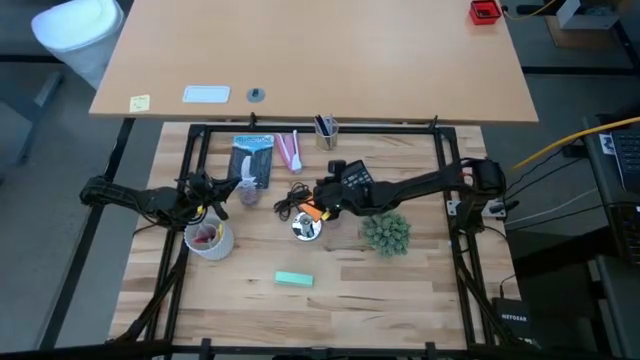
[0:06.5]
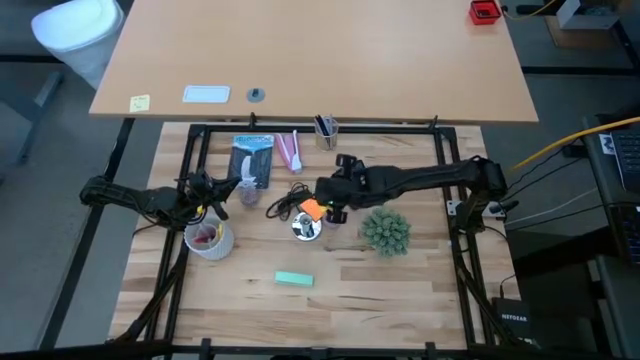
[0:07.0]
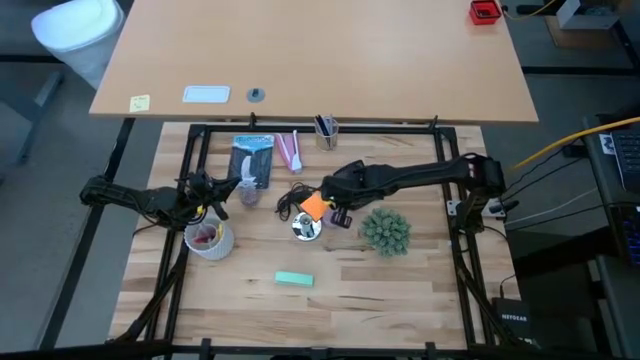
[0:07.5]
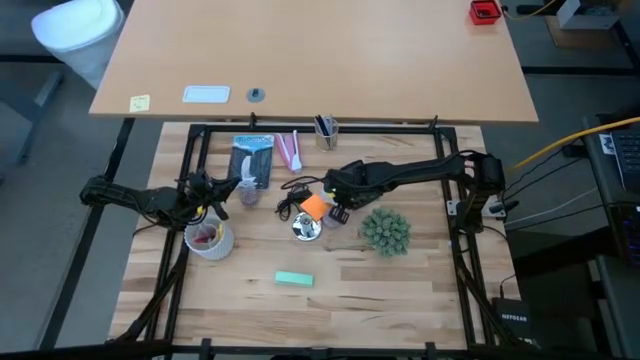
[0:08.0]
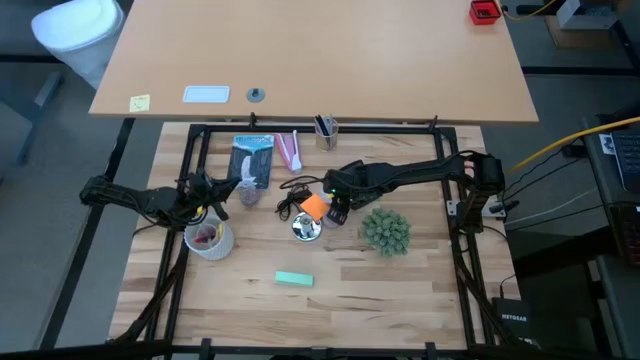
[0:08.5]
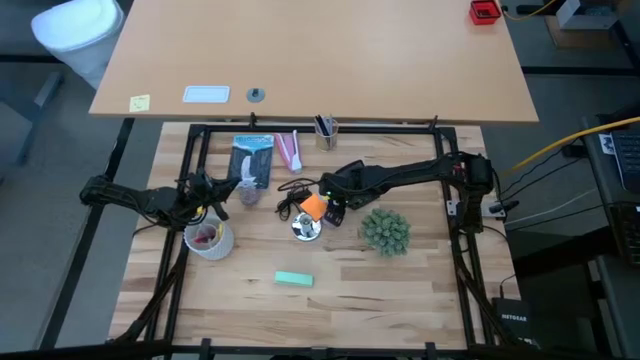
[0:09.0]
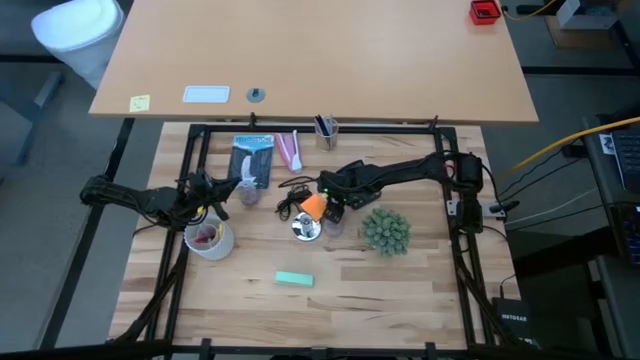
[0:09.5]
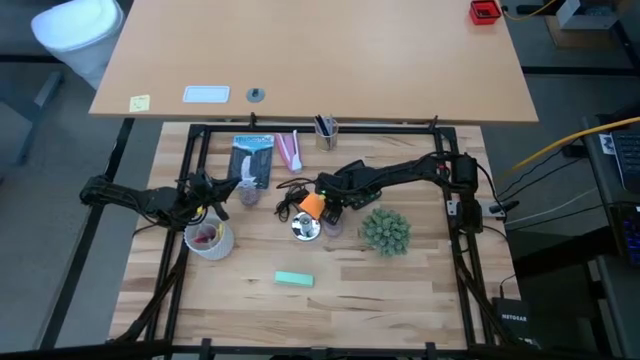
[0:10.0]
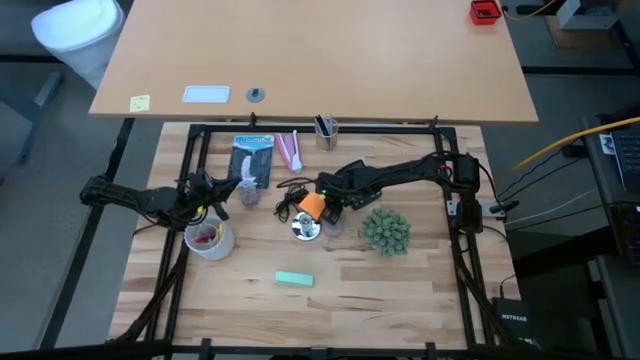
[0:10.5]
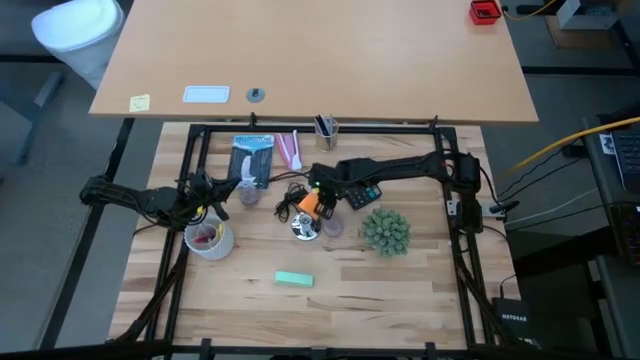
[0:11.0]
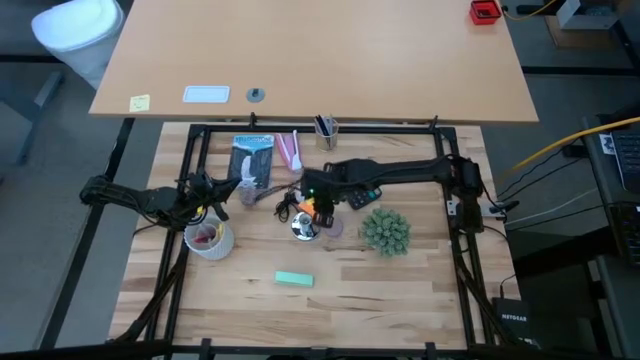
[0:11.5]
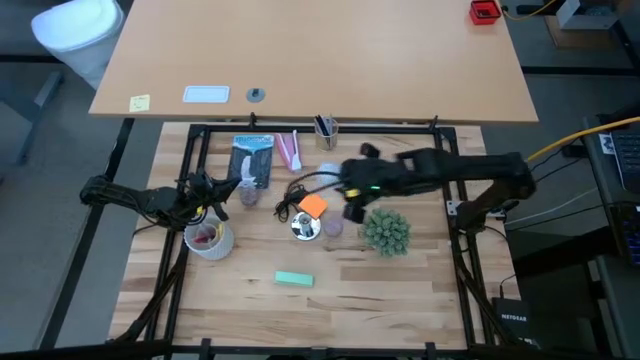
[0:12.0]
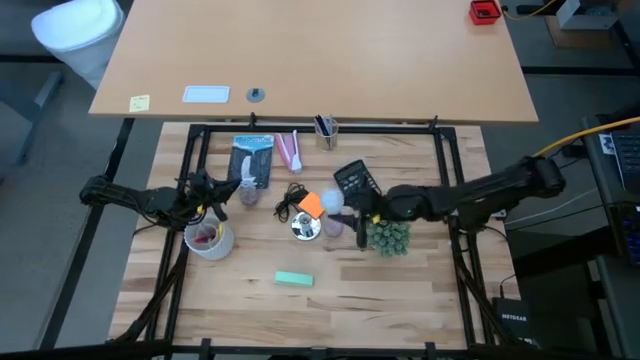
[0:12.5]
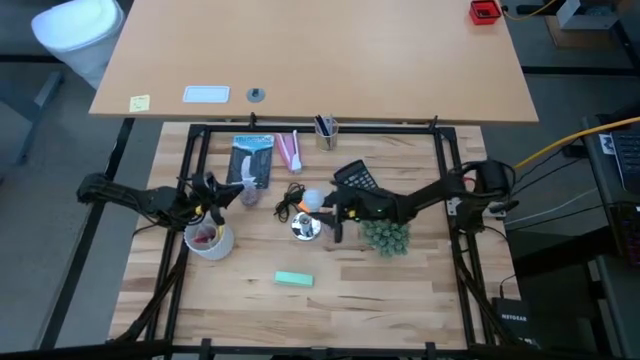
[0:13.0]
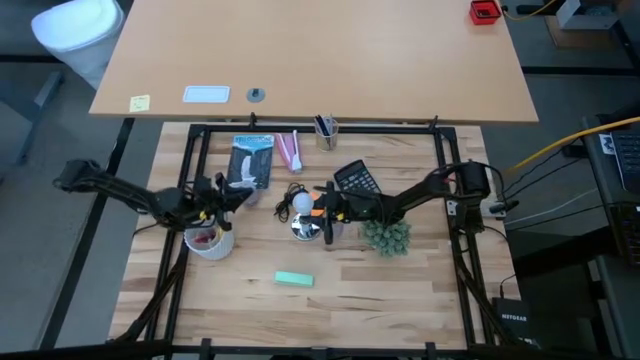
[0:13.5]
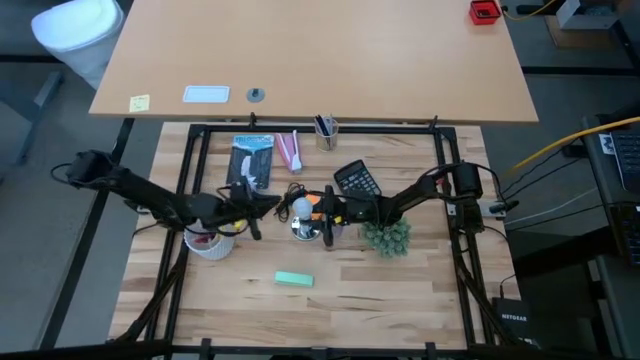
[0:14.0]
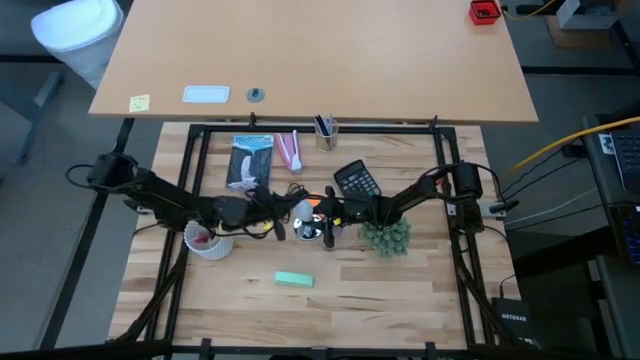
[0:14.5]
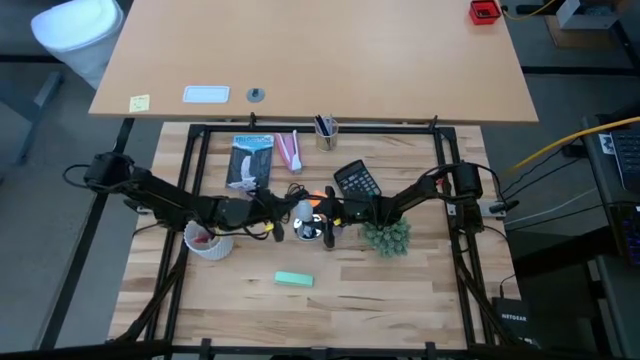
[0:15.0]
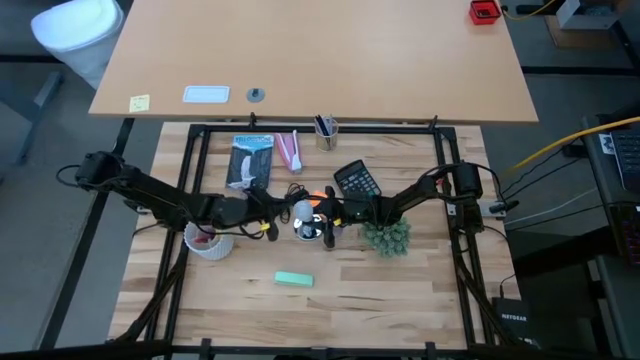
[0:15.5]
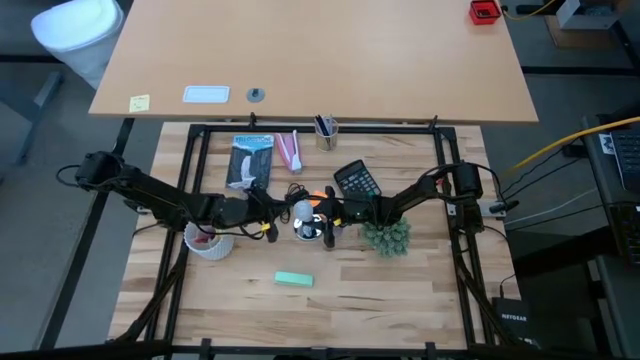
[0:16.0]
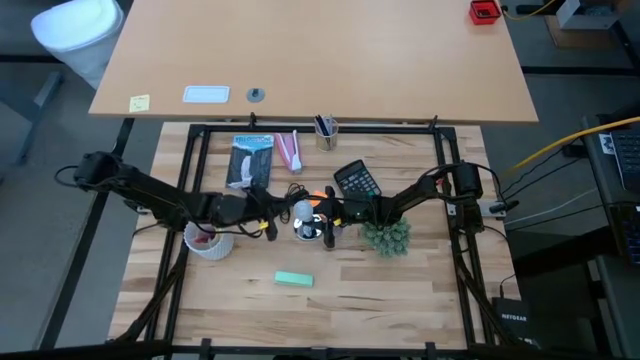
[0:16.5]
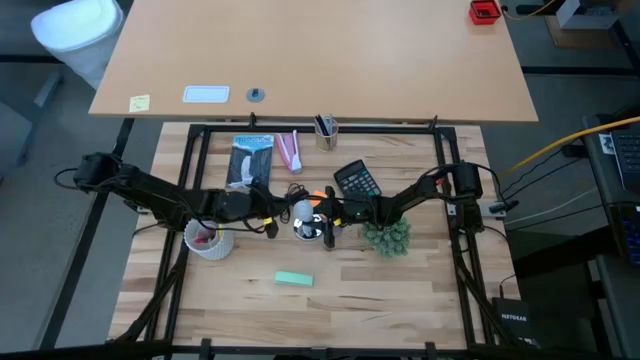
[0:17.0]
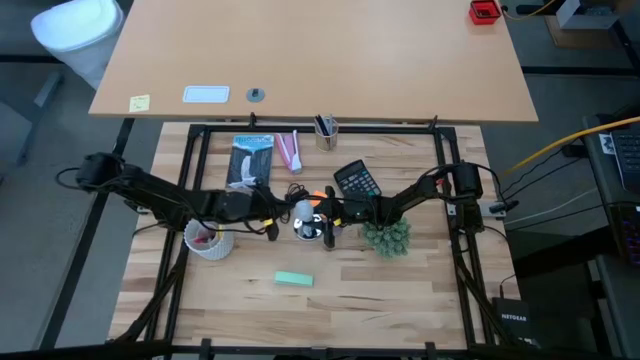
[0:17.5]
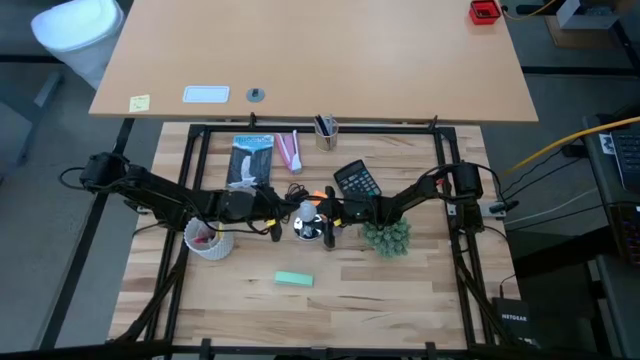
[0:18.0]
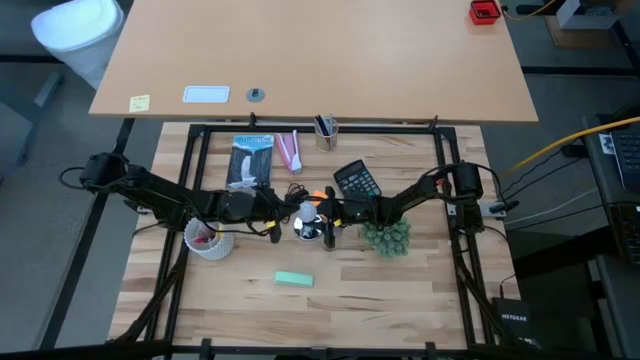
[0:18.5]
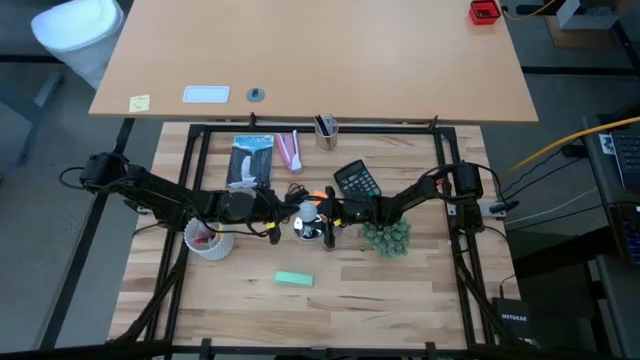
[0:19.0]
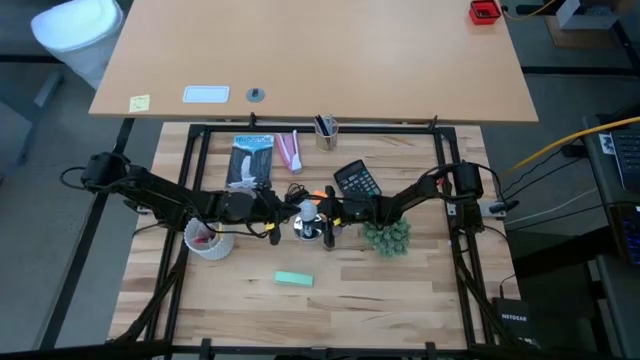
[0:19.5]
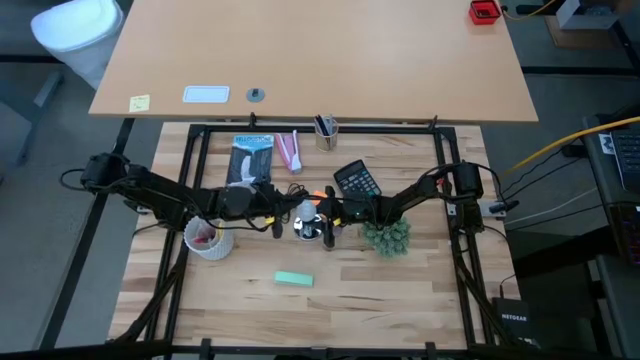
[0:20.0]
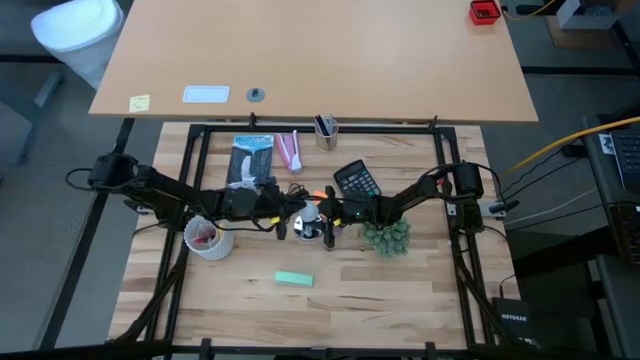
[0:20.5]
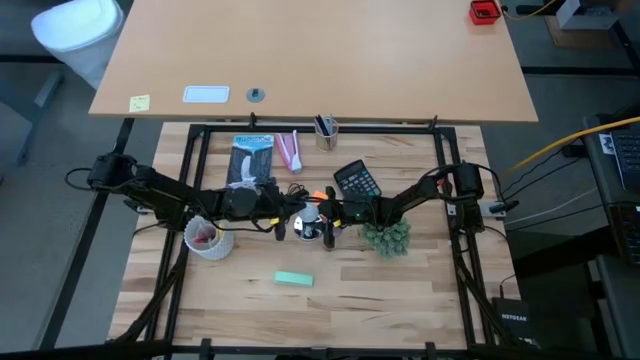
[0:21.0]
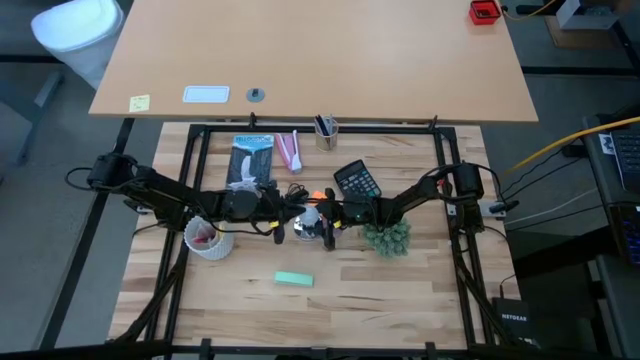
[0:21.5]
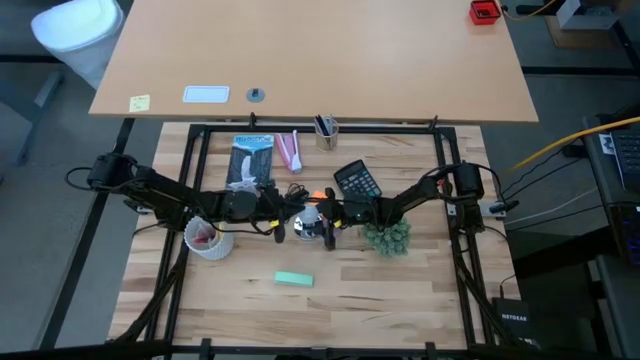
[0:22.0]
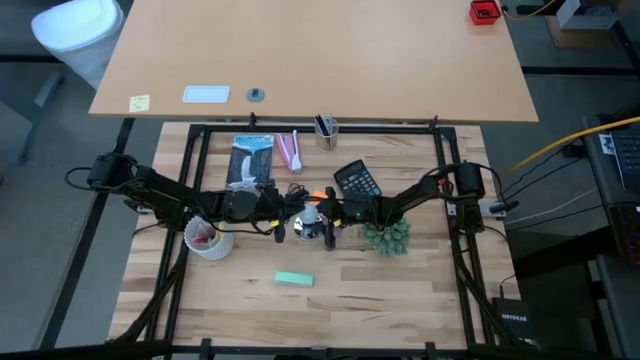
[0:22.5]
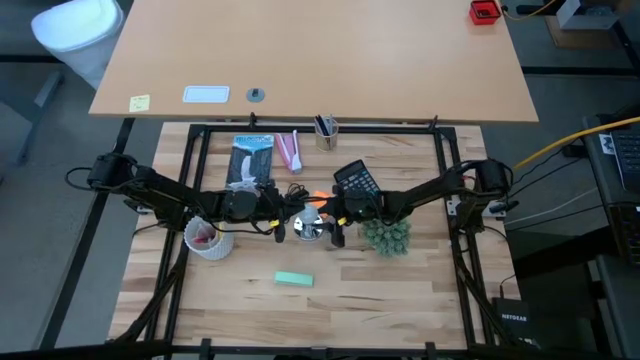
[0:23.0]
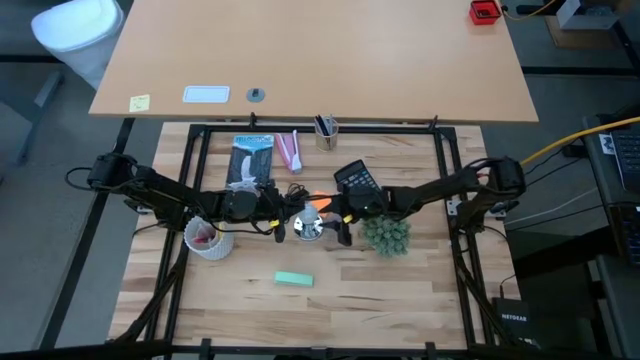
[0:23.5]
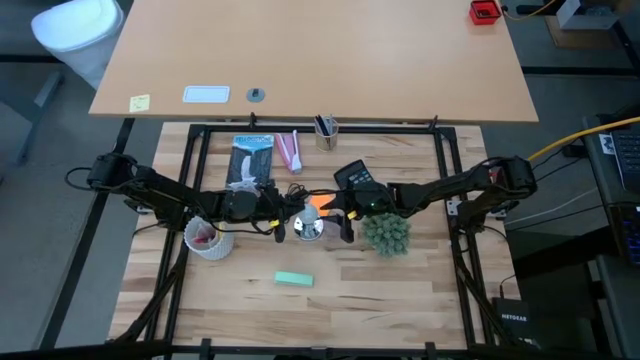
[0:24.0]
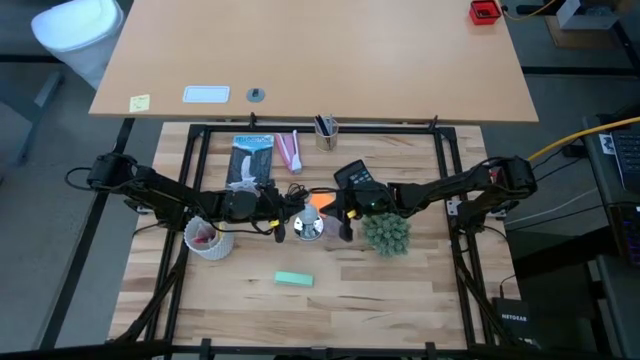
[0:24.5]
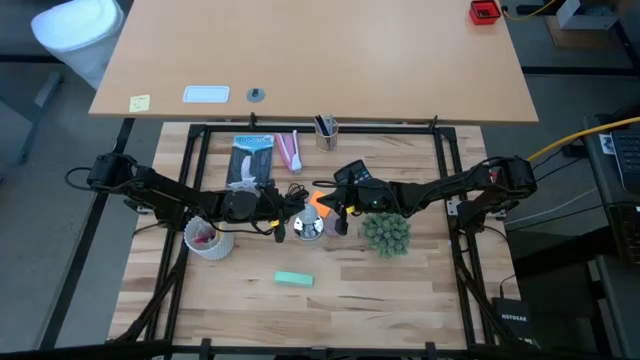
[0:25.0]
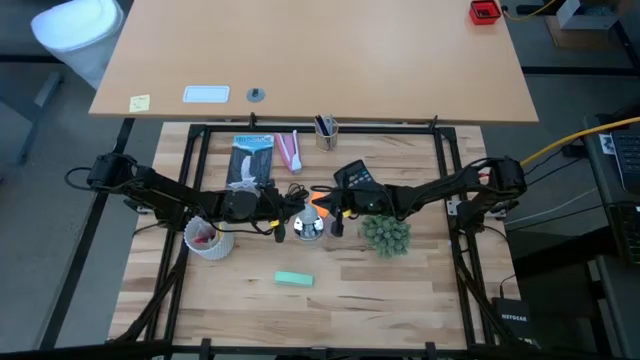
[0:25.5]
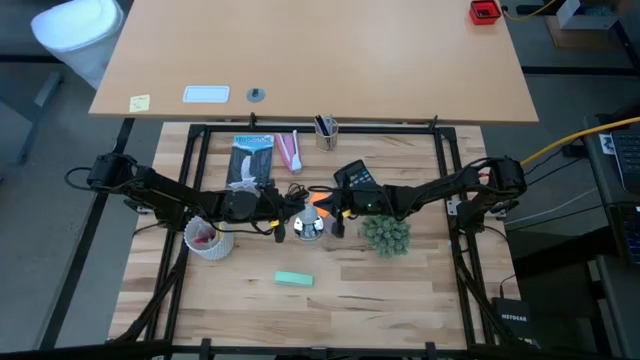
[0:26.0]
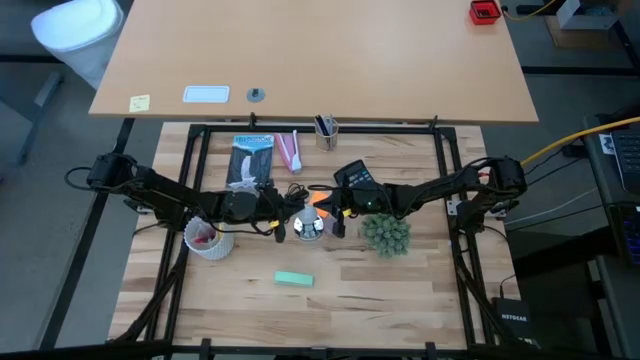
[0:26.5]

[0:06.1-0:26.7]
Task: Screw lightbulb
Insert the lightbulb on the lamp
